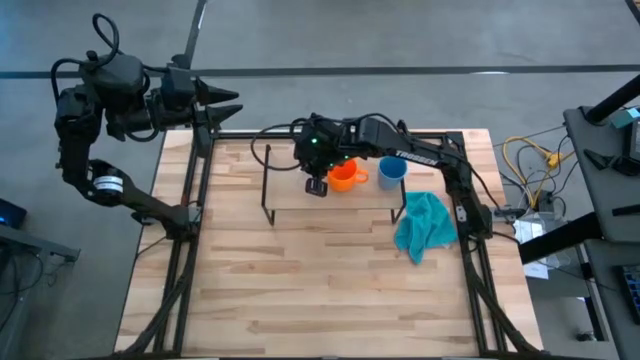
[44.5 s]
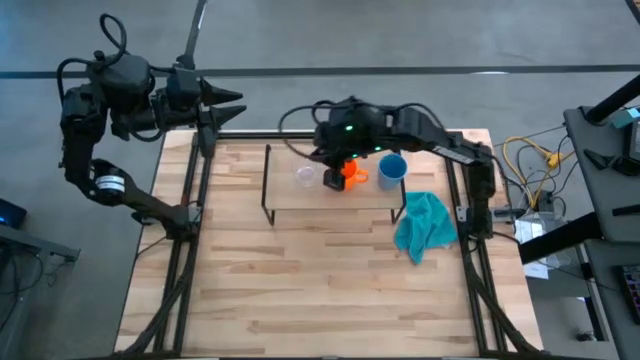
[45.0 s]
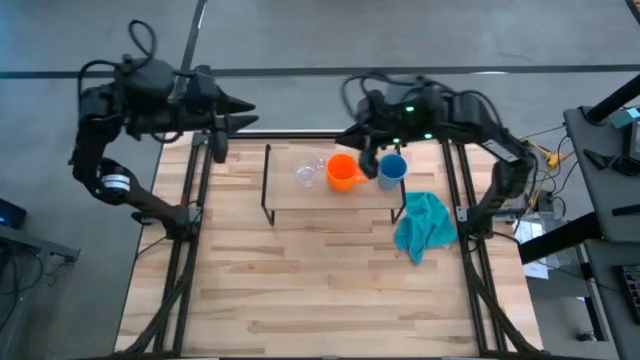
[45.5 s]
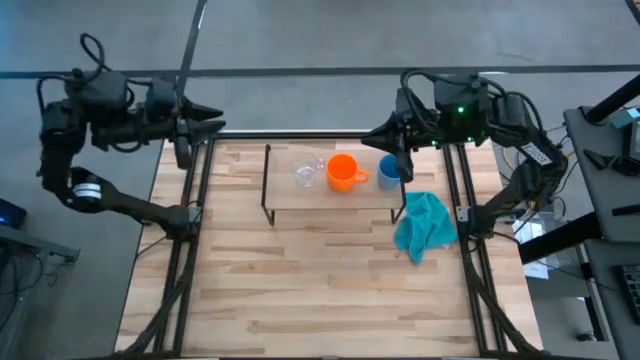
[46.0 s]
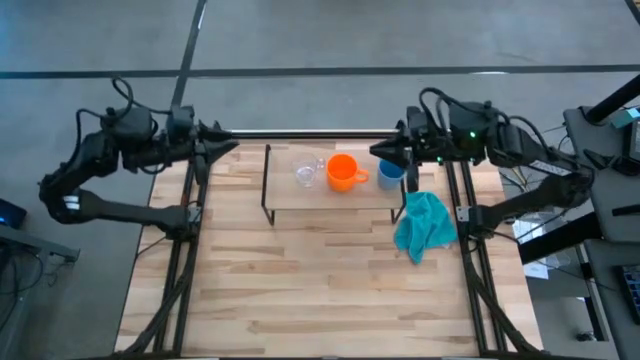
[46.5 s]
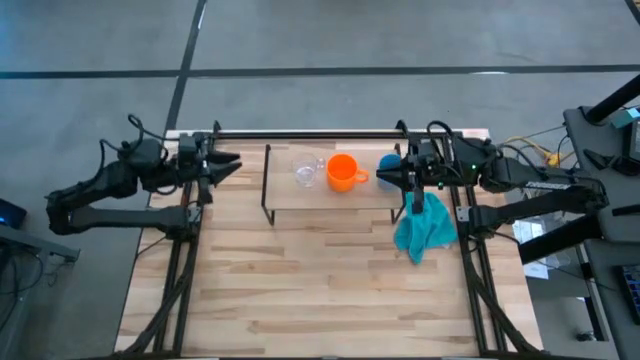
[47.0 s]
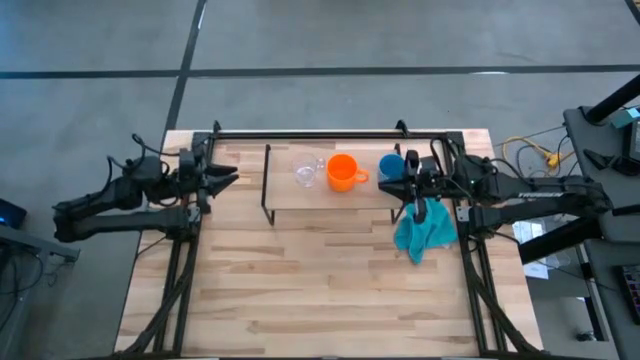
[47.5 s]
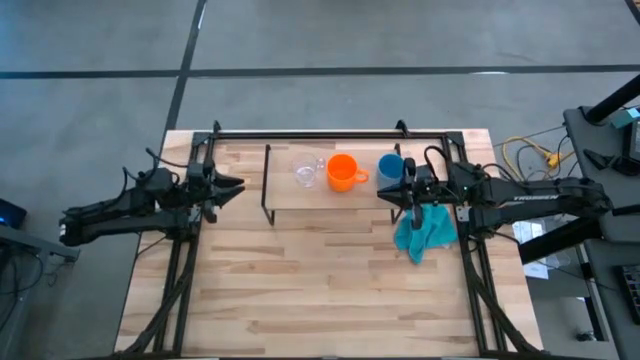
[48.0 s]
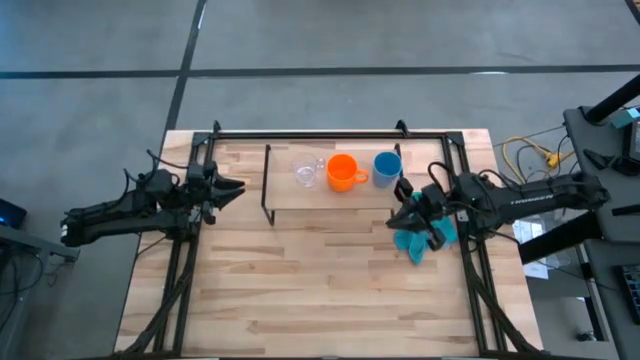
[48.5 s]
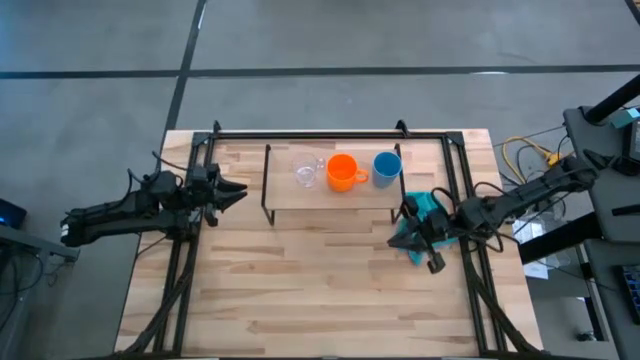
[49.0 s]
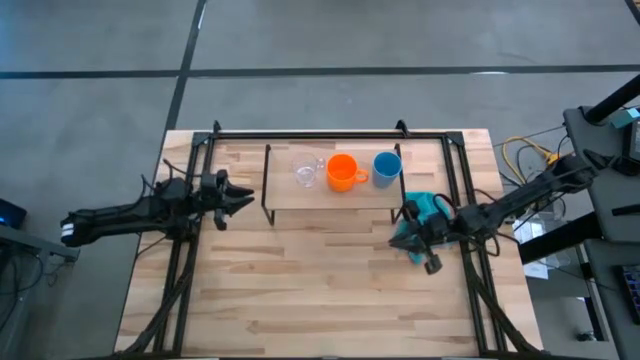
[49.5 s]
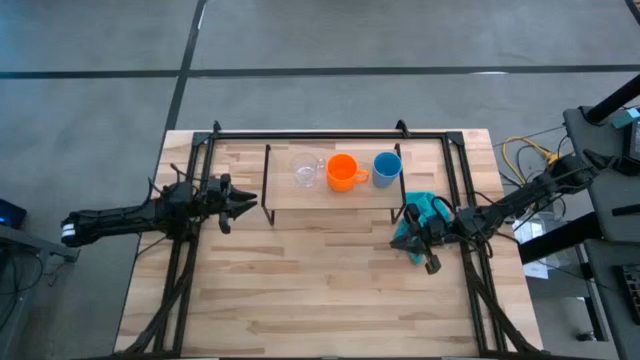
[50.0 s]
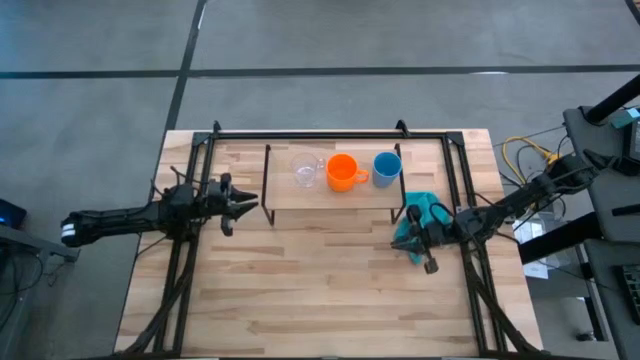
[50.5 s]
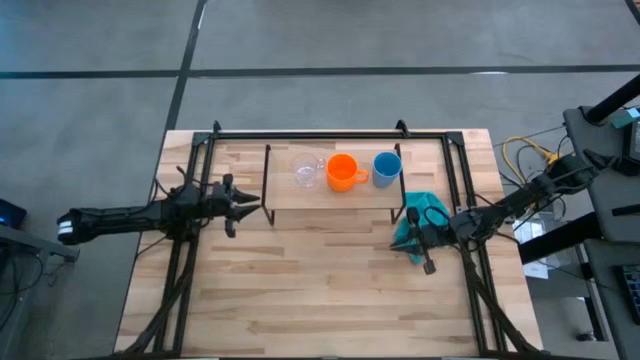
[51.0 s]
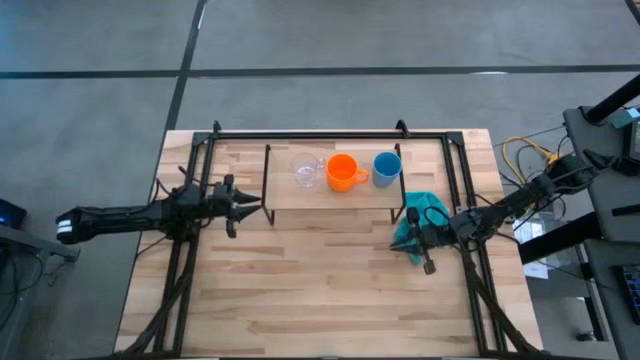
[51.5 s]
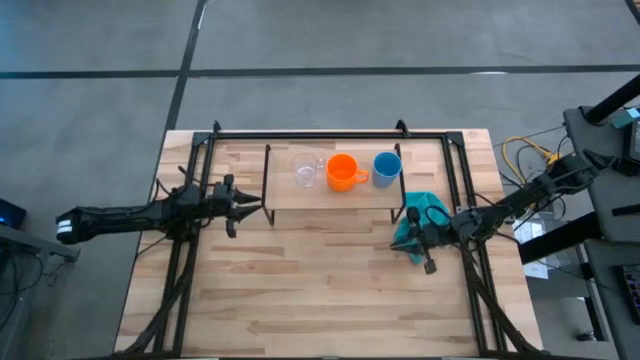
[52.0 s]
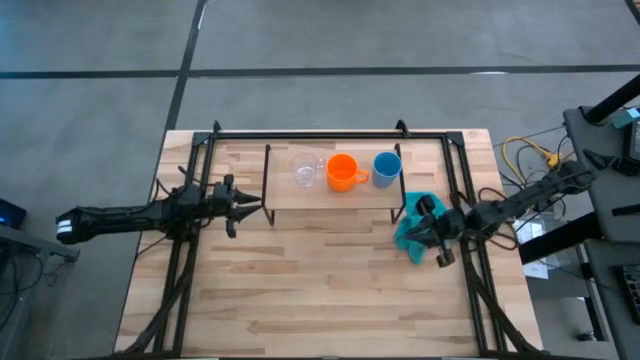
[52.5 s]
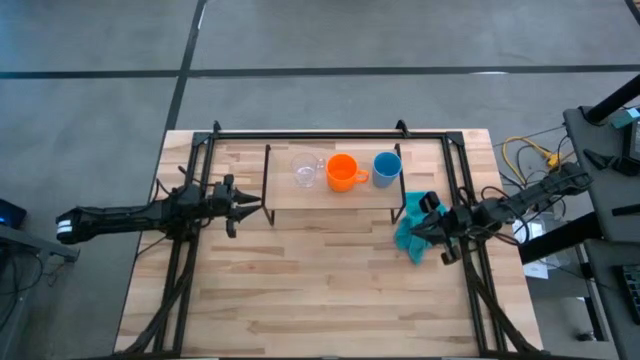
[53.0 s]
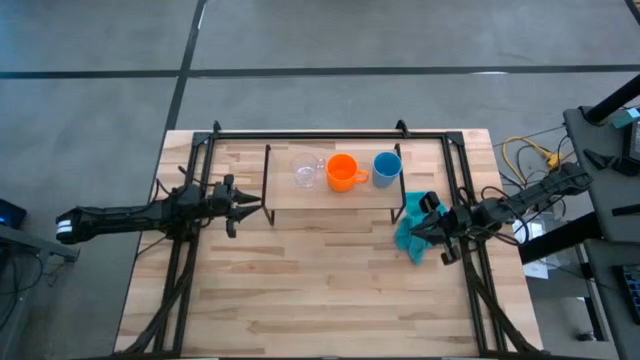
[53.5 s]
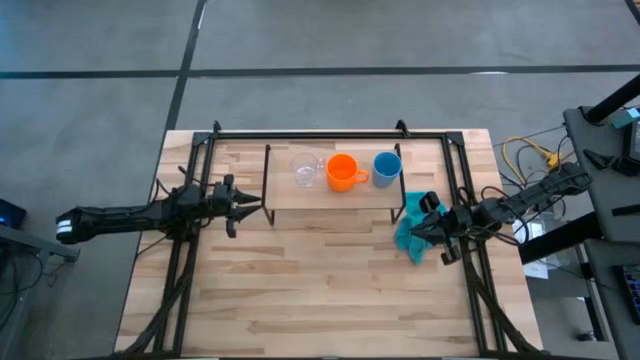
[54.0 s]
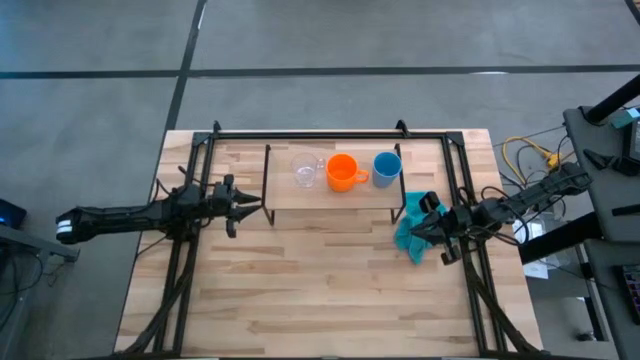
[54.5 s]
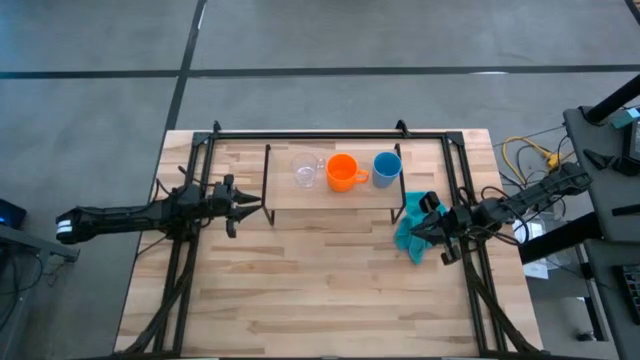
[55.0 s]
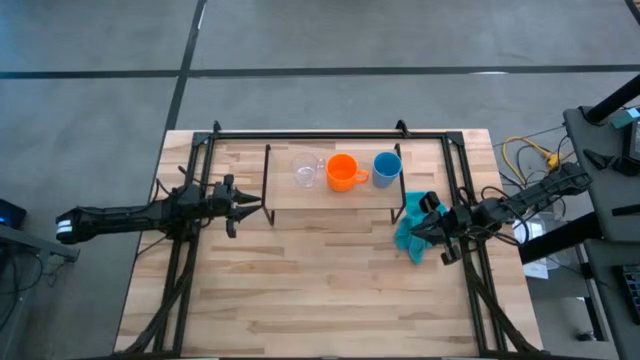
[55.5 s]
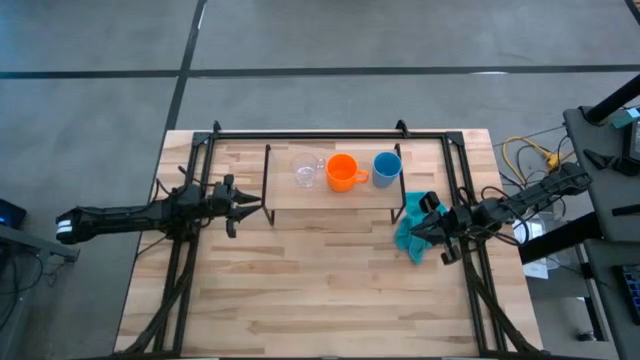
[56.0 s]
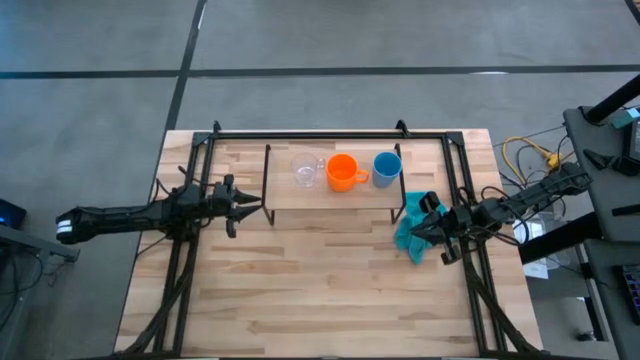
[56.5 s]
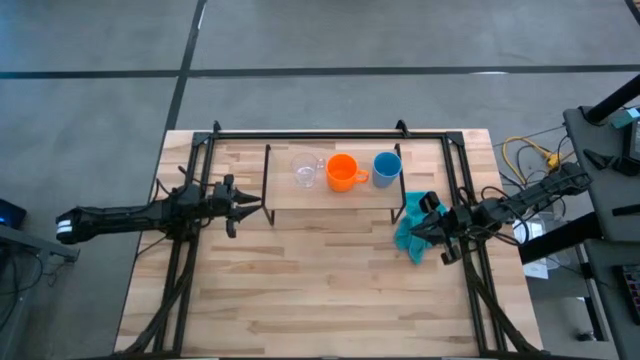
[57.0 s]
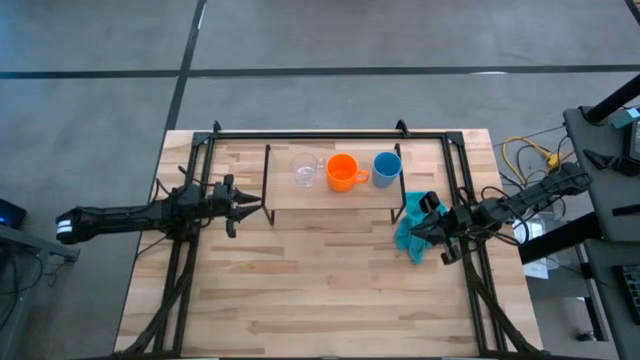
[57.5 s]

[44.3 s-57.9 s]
Task: Stack small to large cups/mugs on shelf
Return to Home Position

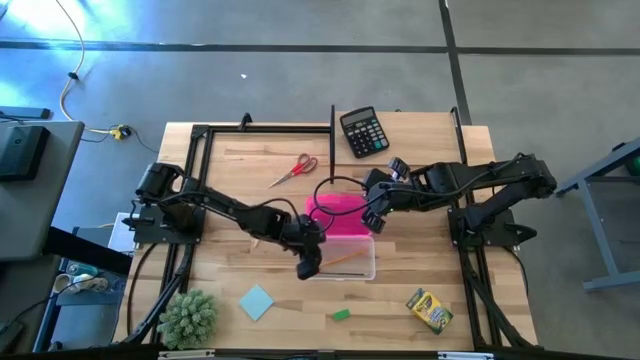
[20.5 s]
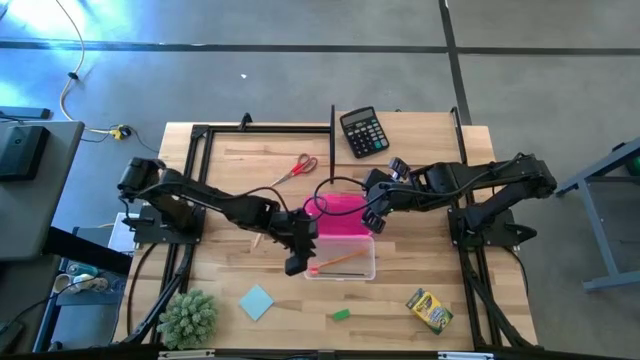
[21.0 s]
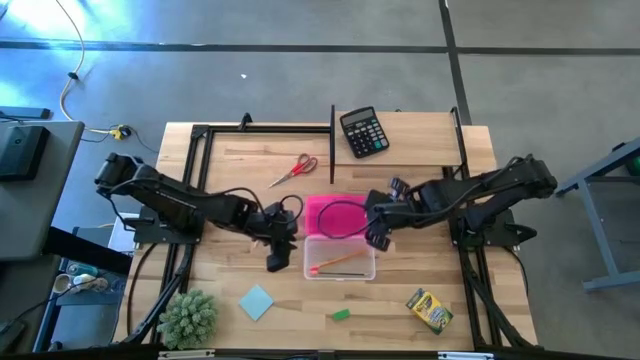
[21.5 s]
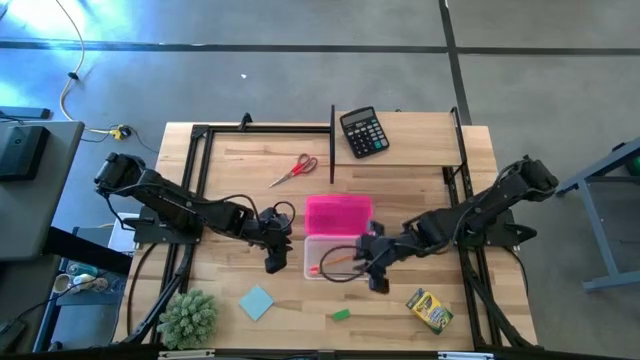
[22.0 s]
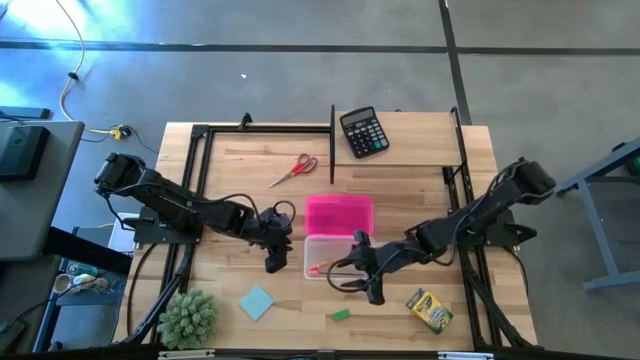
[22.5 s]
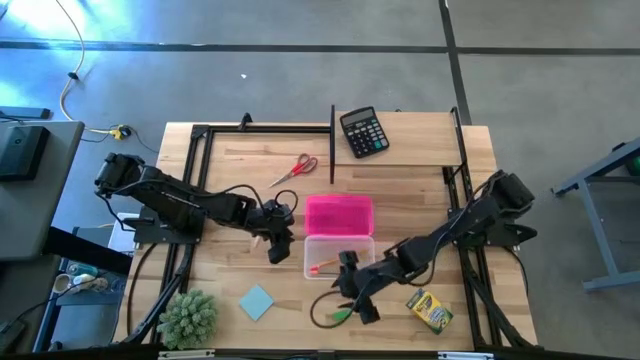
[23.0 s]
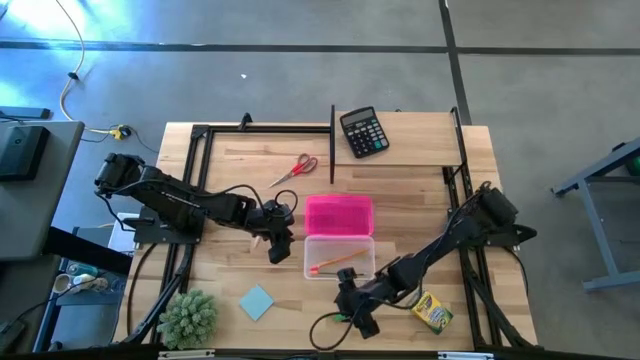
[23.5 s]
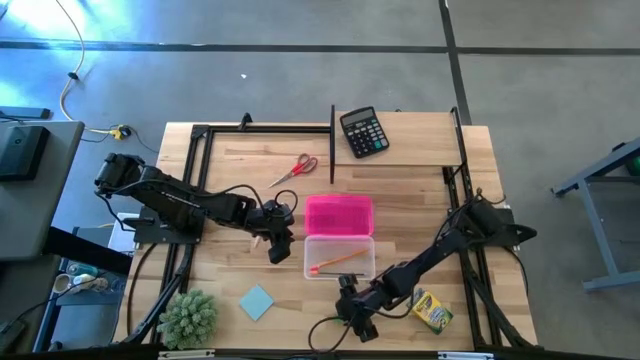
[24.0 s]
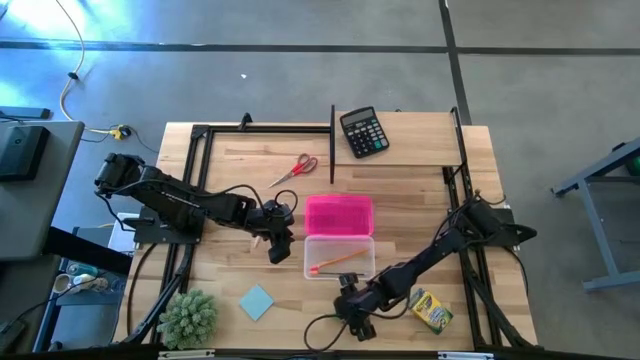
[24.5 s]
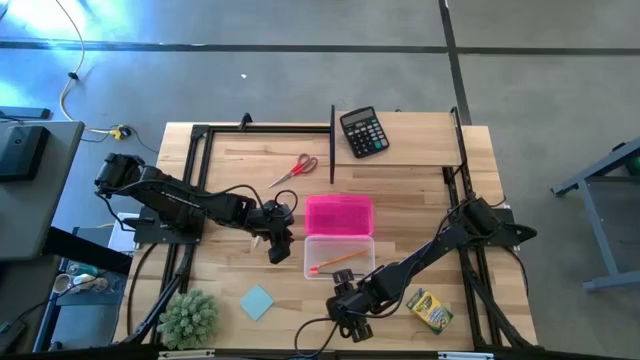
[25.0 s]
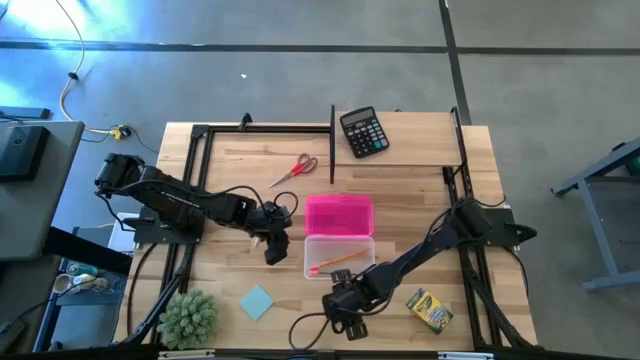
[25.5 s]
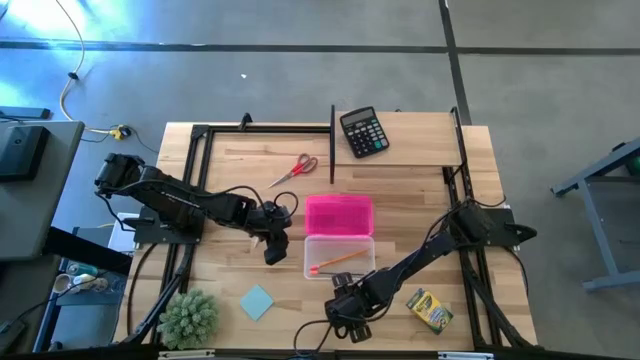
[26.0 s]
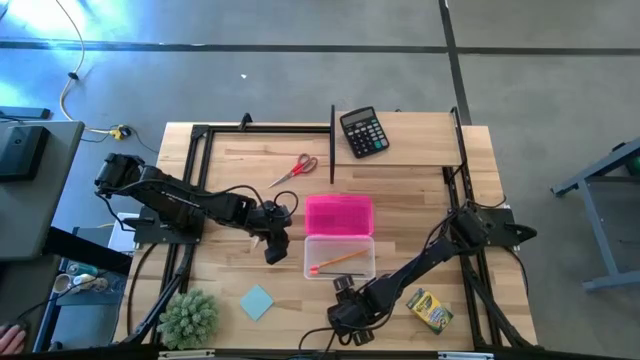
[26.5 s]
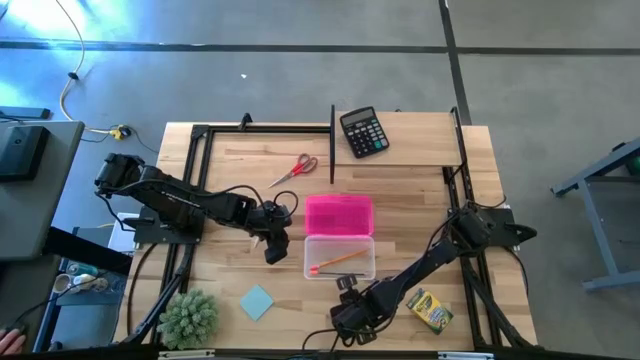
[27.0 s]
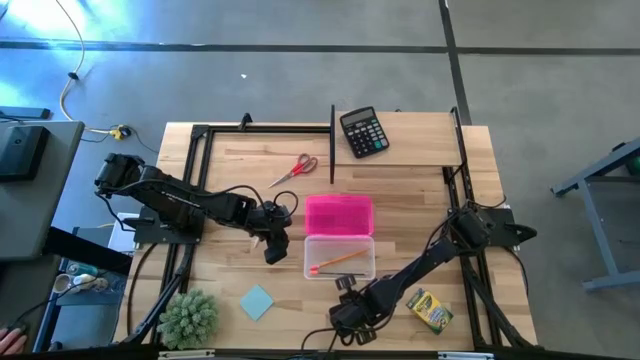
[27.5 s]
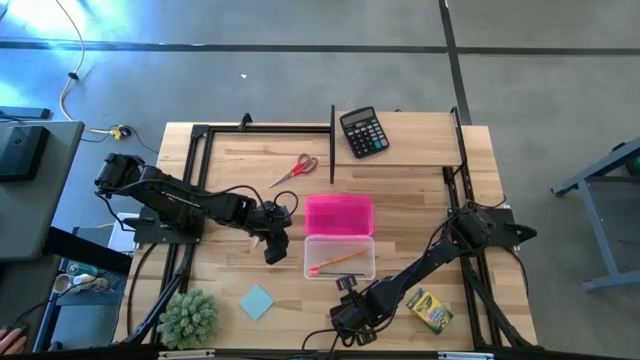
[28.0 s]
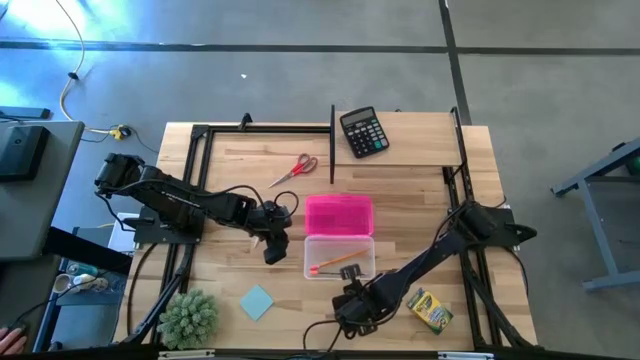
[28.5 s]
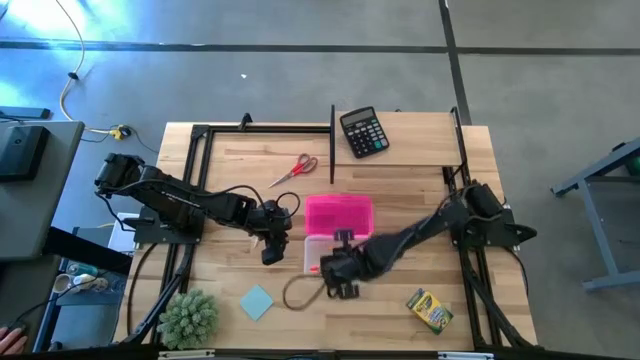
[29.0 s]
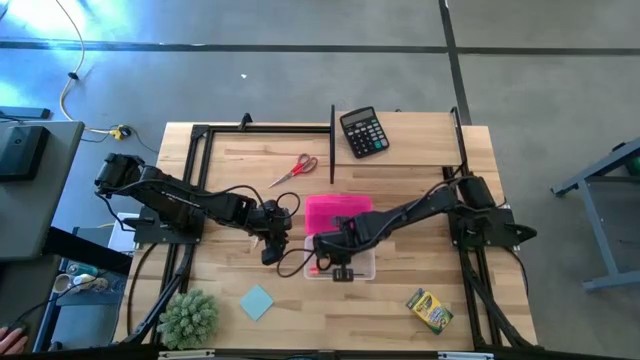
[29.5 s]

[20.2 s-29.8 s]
Task: Pack school essentials
Put the green eraser into the supply box
